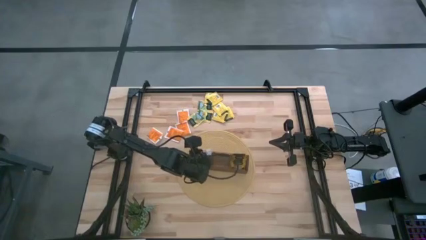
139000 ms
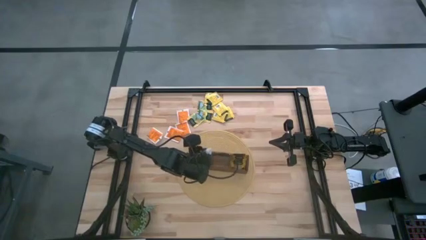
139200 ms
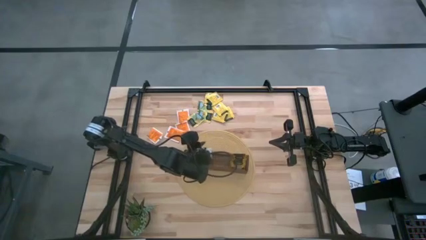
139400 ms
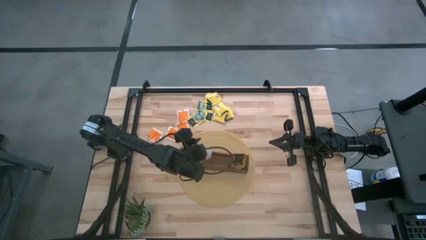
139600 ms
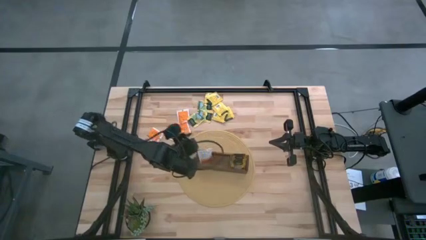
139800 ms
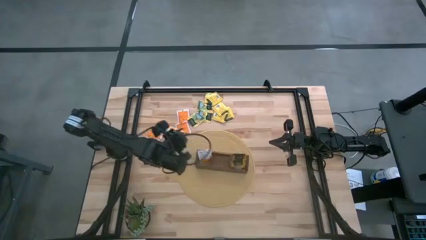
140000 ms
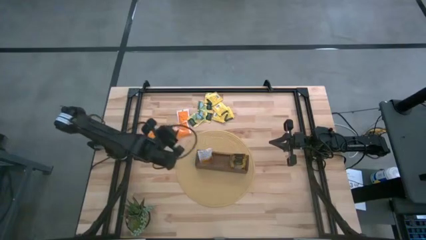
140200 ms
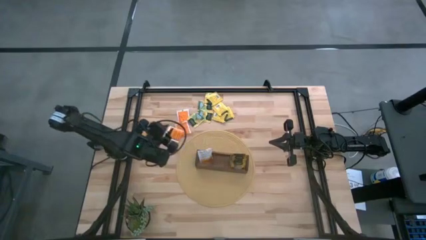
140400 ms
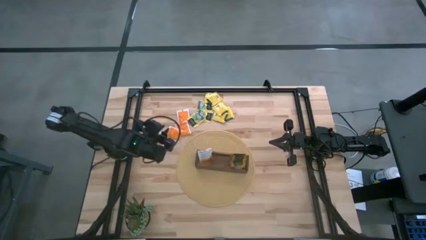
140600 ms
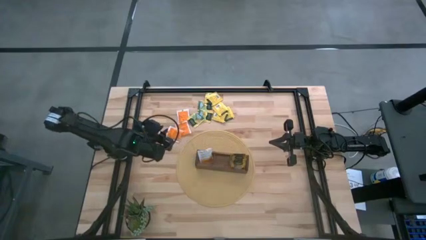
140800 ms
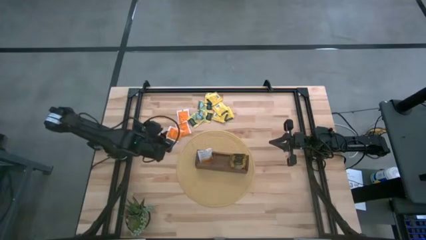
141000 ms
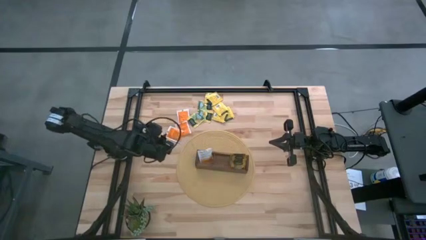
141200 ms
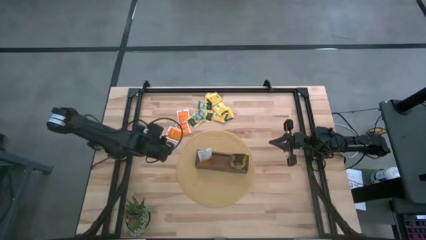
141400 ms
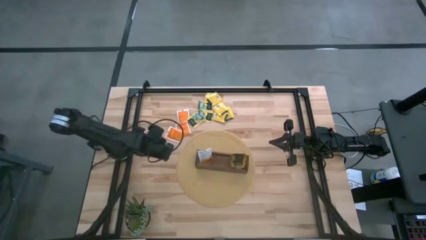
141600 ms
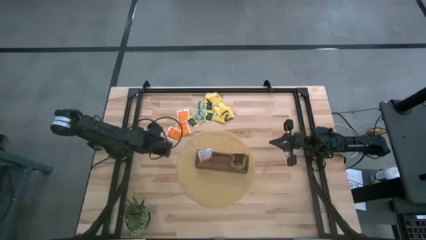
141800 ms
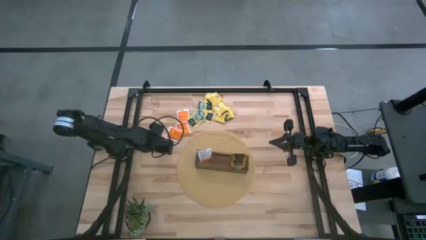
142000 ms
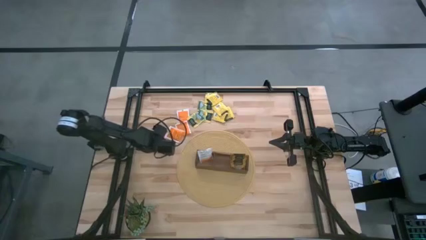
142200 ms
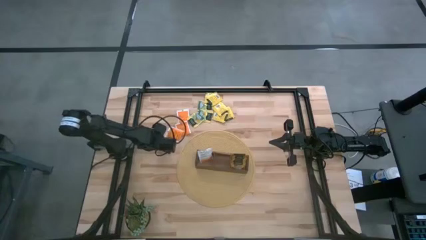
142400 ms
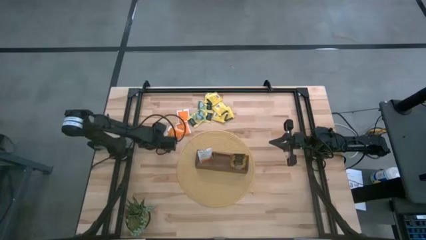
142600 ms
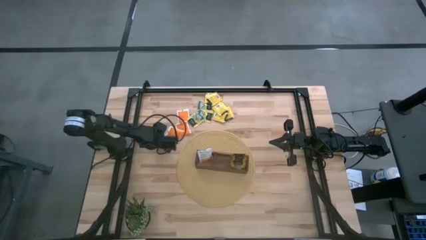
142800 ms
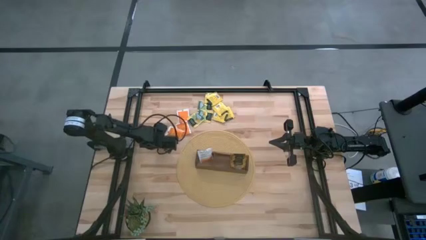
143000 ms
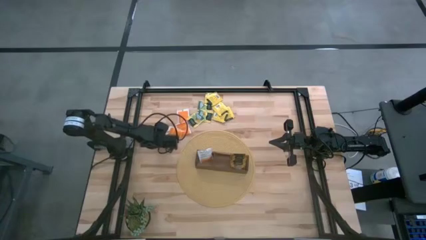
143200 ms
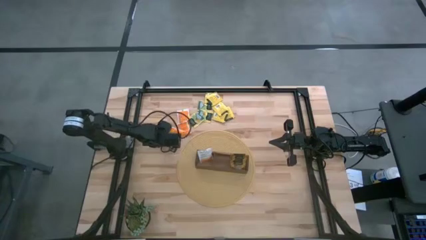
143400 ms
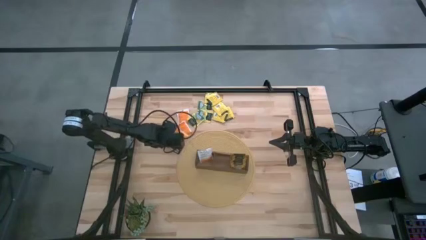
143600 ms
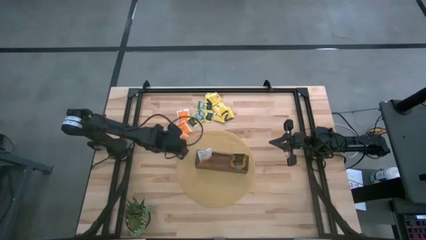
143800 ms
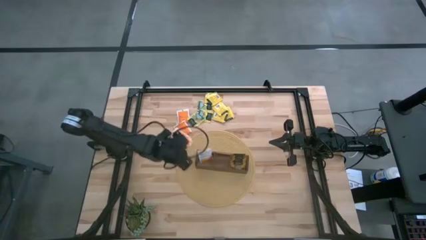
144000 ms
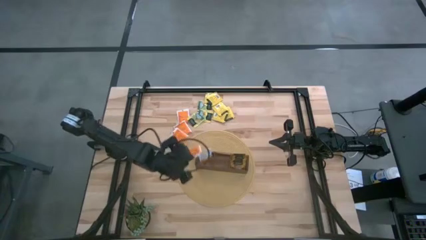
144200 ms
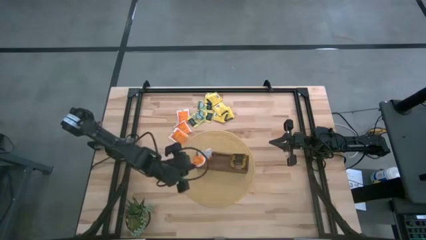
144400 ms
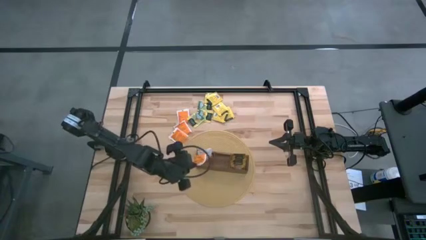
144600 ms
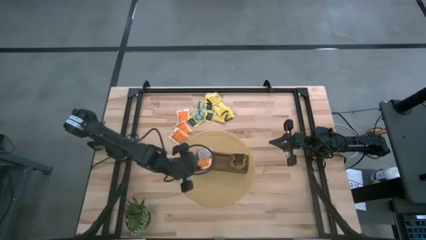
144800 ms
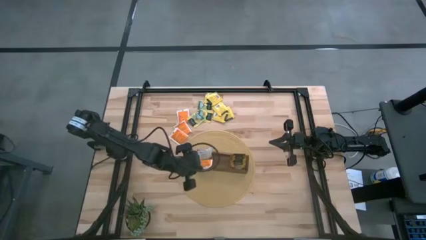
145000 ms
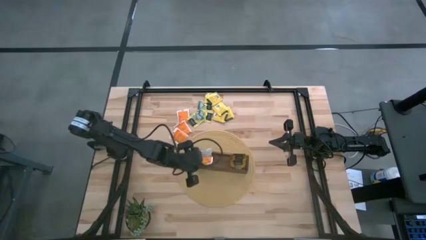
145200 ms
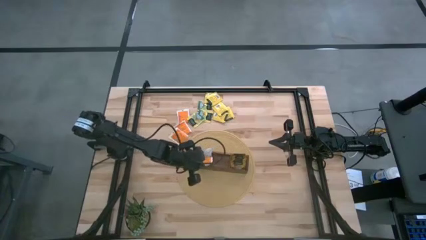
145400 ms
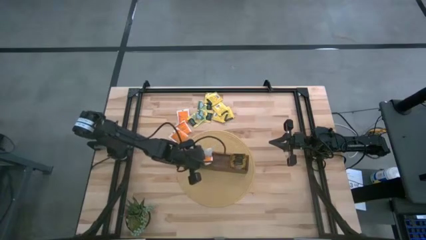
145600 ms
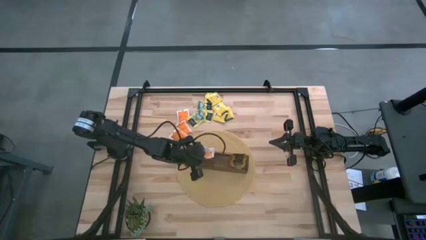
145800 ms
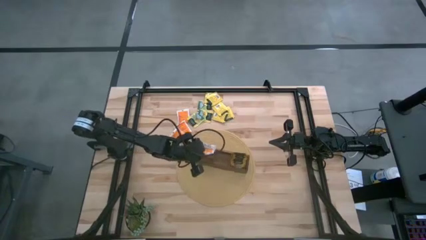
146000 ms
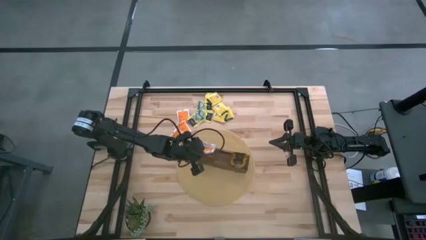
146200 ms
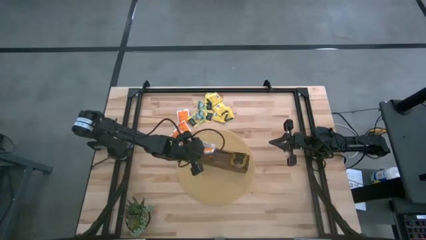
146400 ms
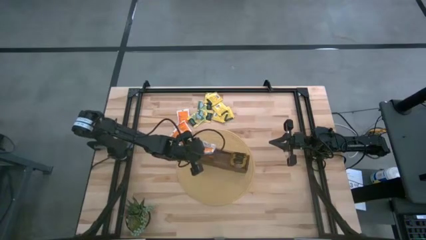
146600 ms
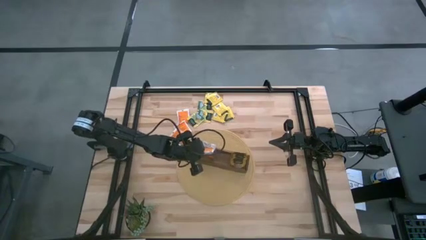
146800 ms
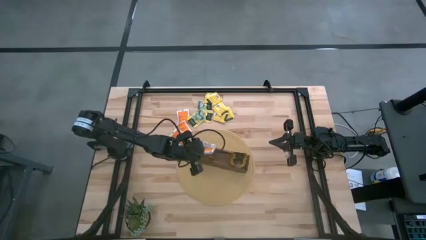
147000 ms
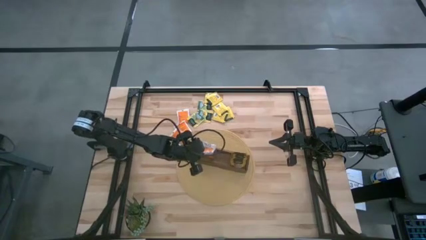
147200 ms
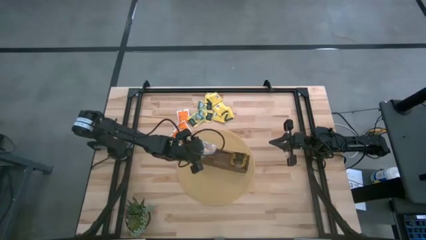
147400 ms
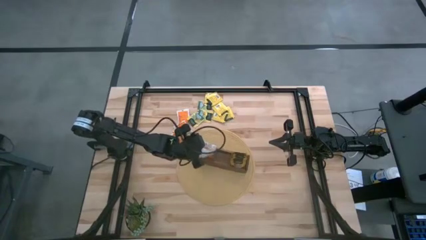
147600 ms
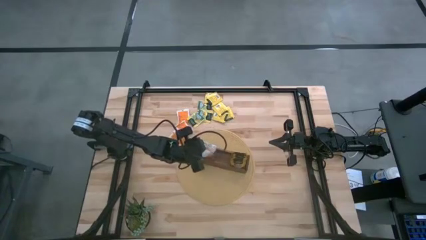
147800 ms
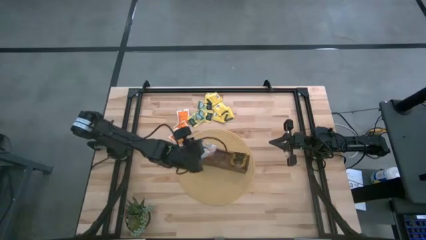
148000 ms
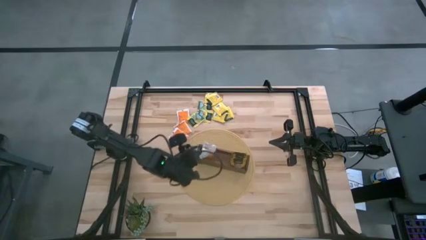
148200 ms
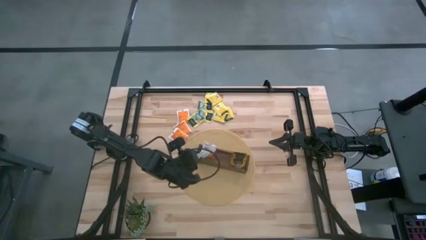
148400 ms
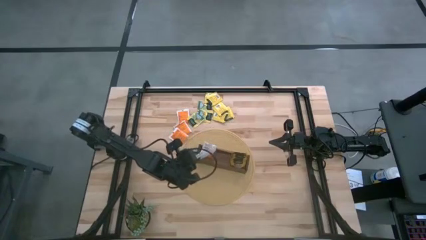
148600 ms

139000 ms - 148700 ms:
Task: Pick & Place Tea
Put the white and orange tea bag into the wooden organizer

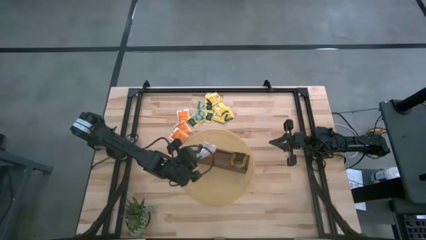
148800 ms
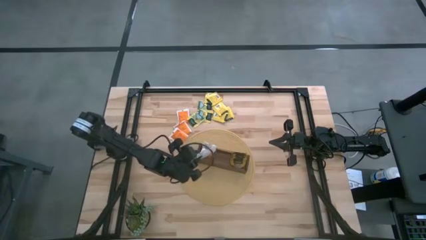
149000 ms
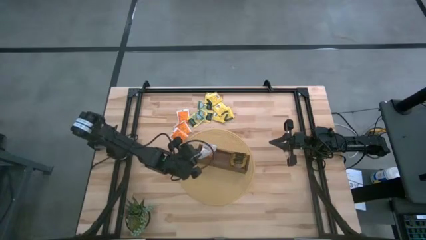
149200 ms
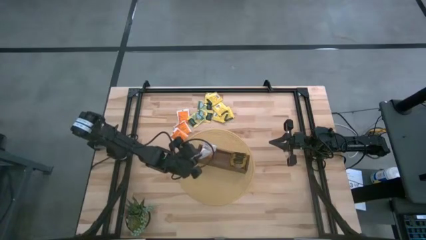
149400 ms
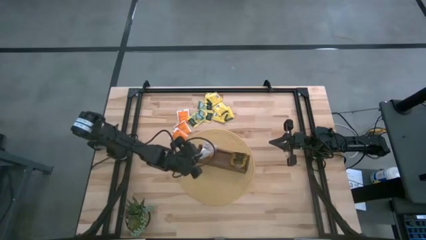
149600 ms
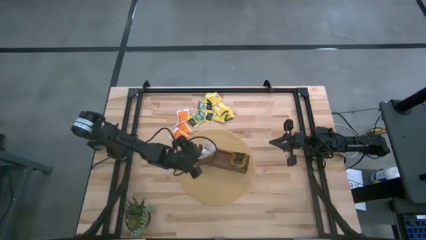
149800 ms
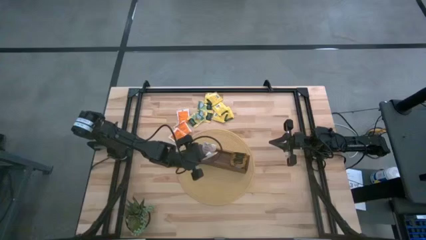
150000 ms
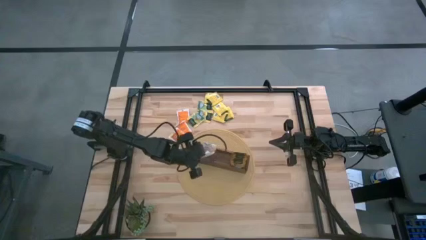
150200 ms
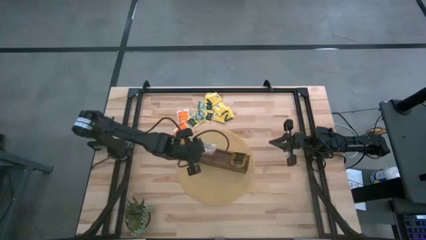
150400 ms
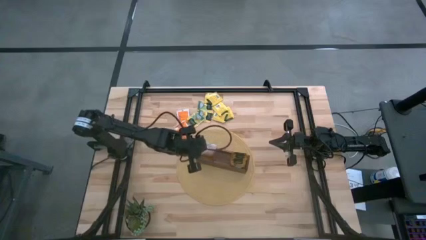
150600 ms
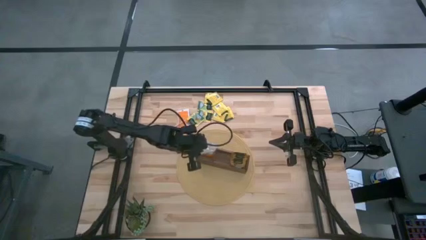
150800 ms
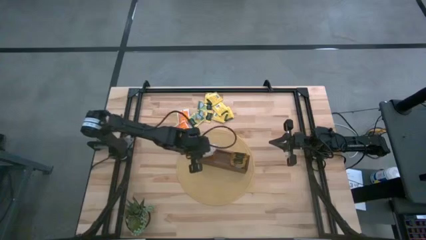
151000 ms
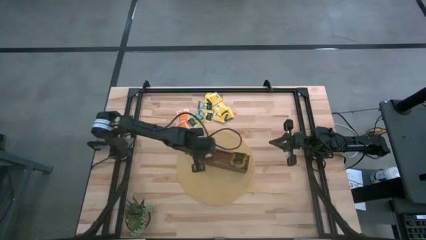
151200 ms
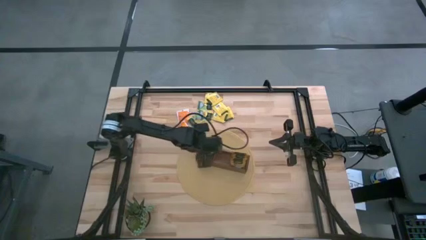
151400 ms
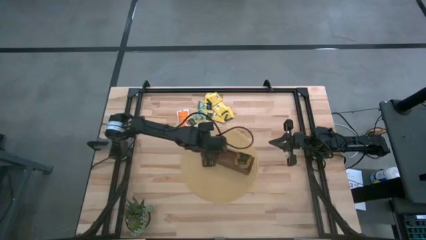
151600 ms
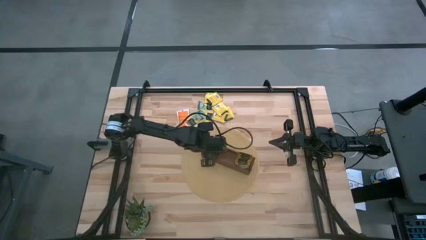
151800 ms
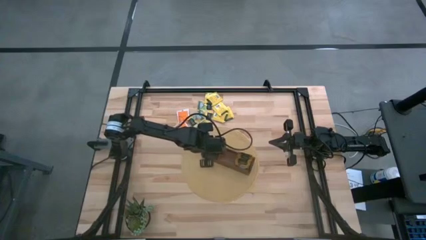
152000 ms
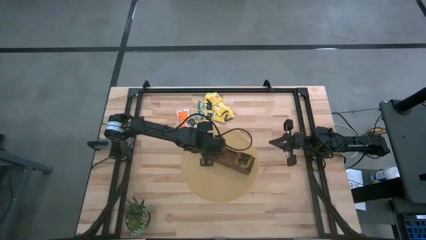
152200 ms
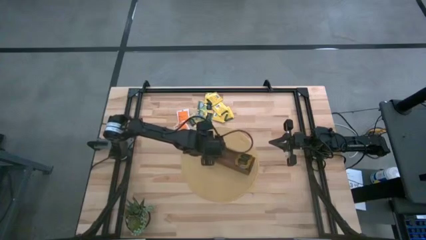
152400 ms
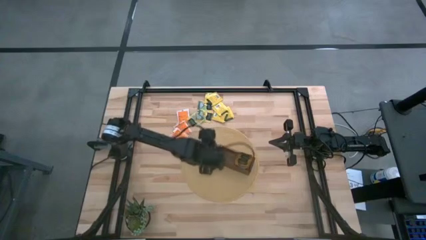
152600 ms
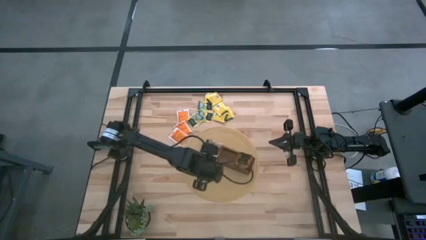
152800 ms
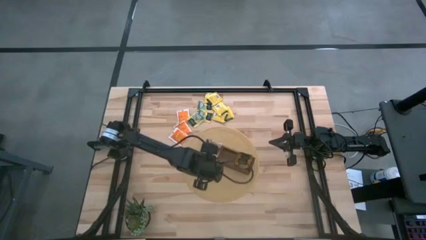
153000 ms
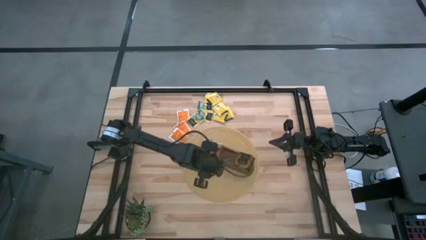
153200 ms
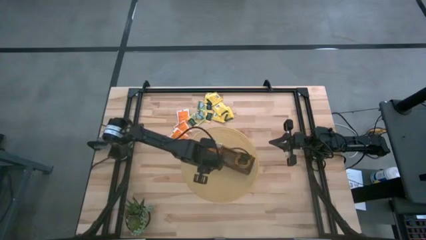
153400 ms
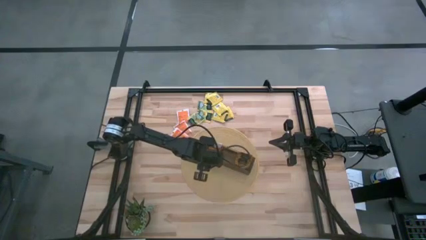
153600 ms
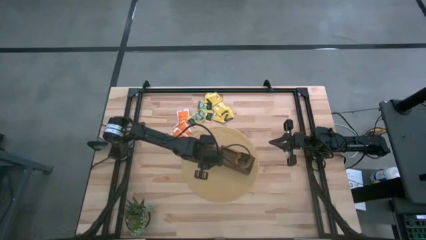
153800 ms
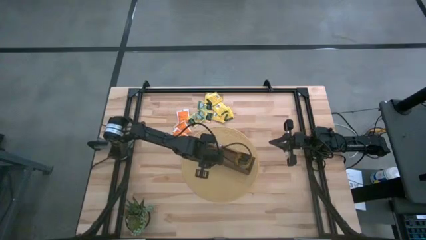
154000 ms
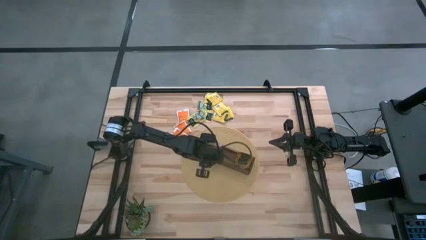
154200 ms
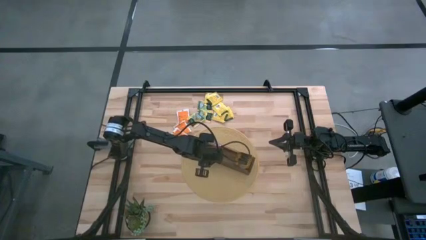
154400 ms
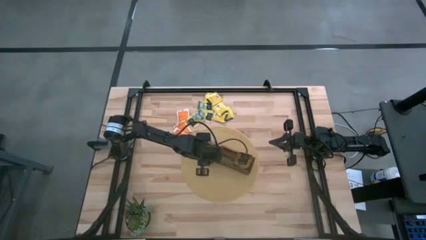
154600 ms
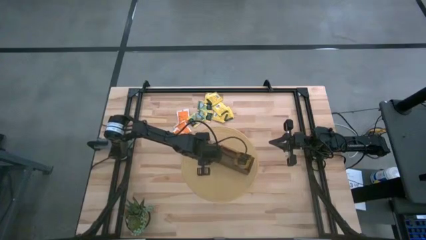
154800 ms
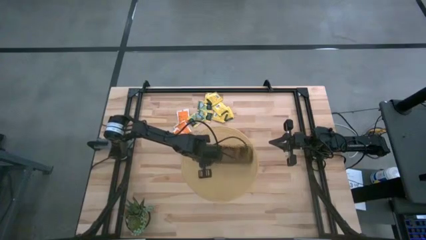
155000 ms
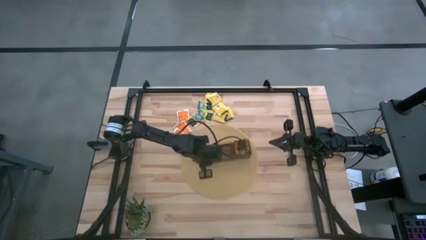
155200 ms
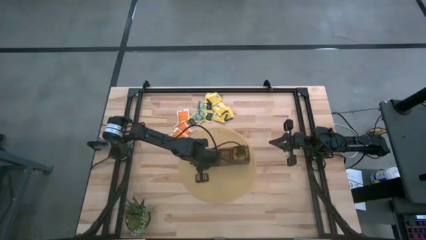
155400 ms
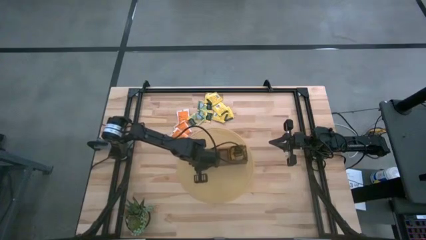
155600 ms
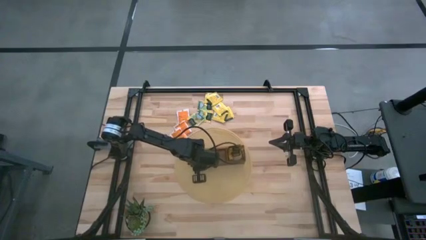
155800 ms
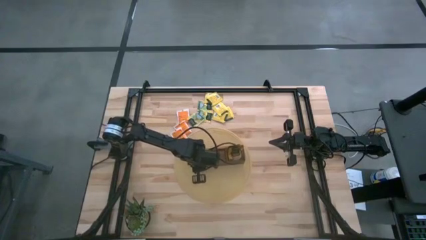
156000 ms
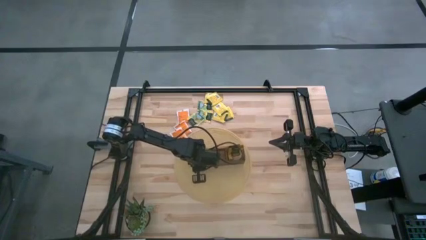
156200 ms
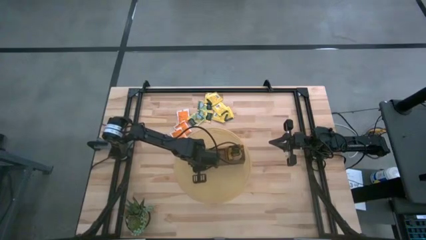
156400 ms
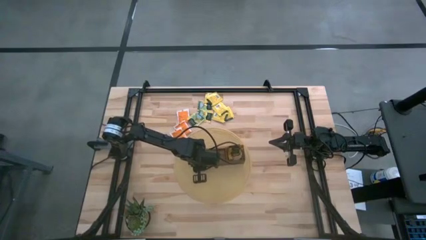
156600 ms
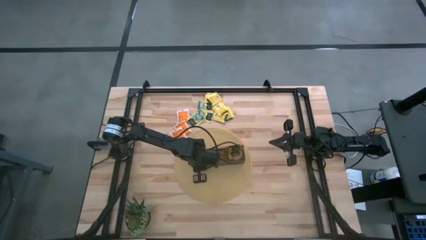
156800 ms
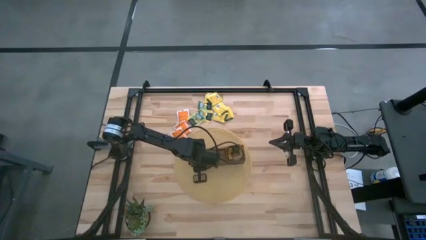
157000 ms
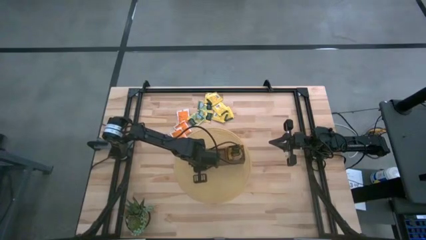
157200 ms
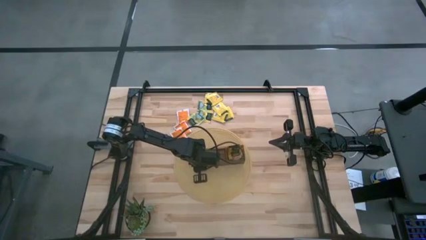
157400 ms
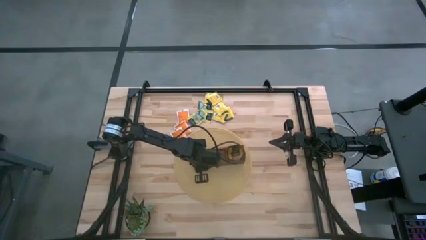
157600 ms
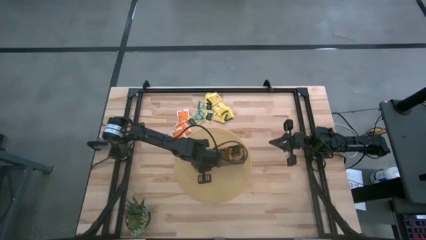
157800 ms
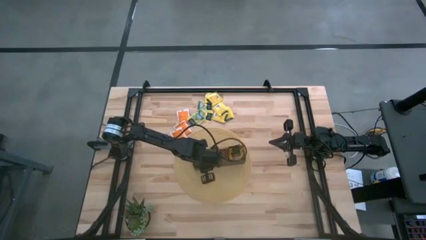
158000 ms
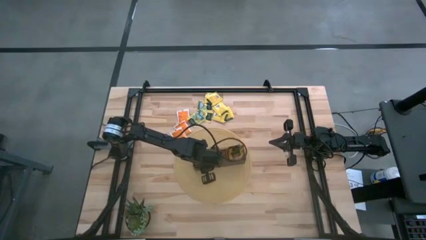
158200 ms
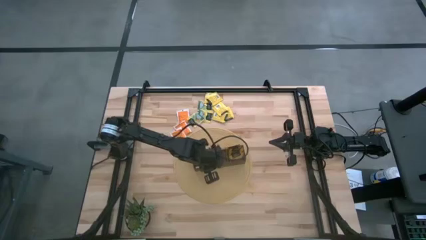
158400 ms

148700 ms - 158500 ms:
Put the white and orange tea bag into the wooden organizer
